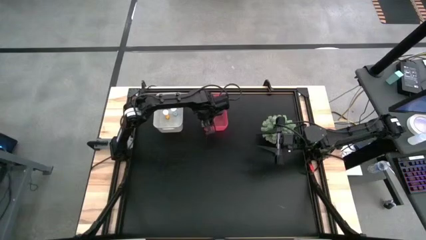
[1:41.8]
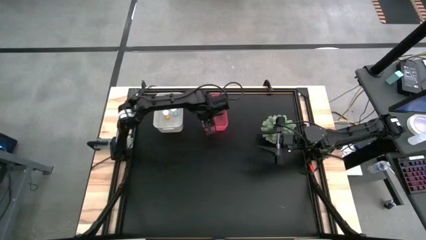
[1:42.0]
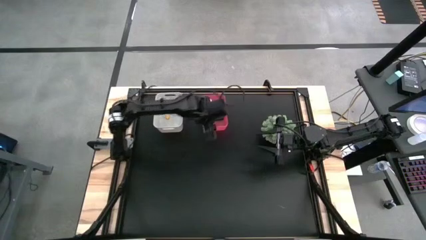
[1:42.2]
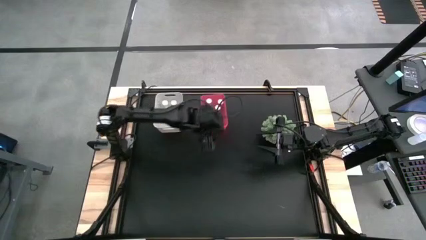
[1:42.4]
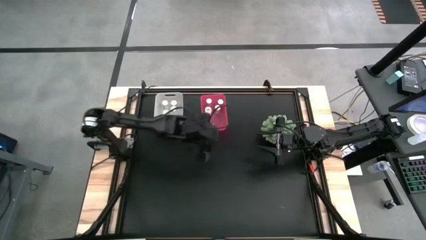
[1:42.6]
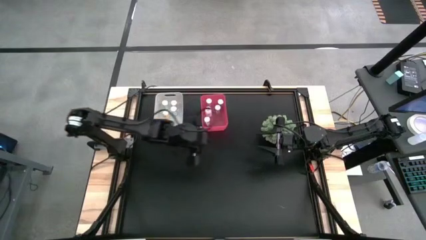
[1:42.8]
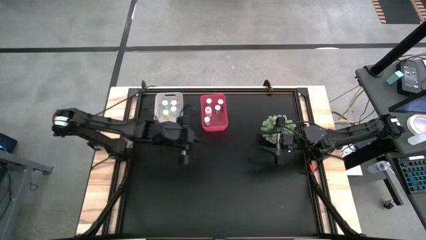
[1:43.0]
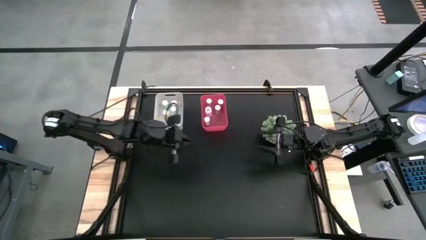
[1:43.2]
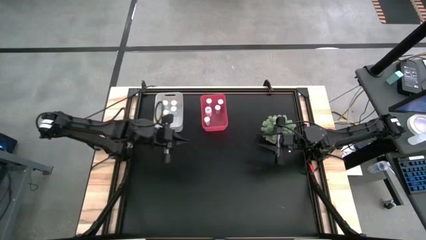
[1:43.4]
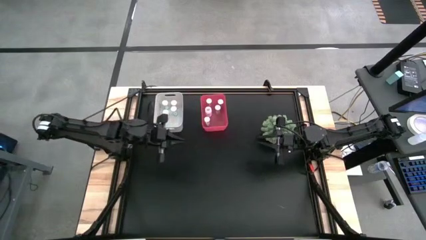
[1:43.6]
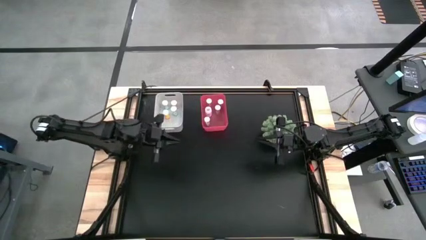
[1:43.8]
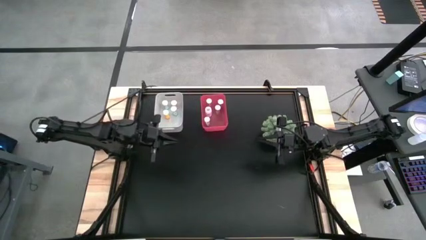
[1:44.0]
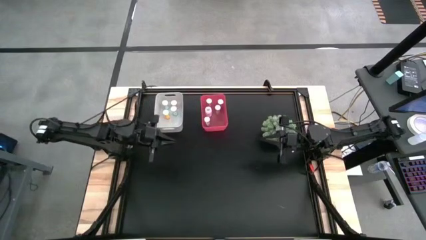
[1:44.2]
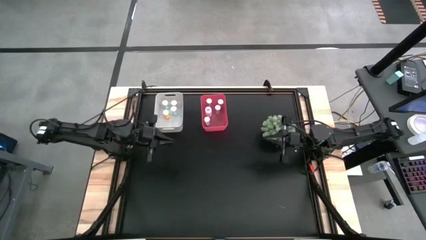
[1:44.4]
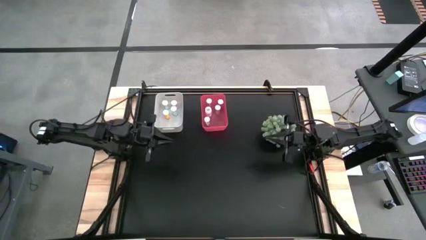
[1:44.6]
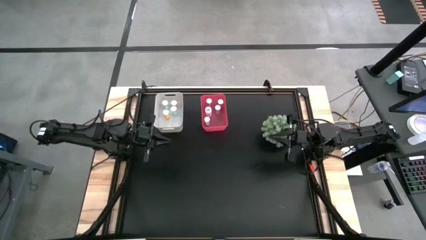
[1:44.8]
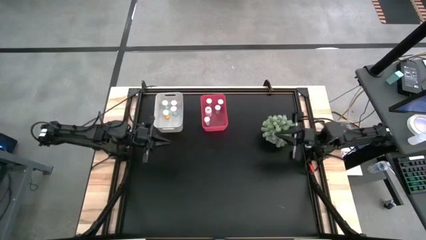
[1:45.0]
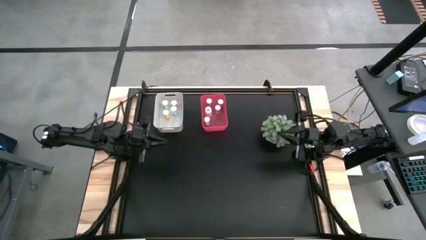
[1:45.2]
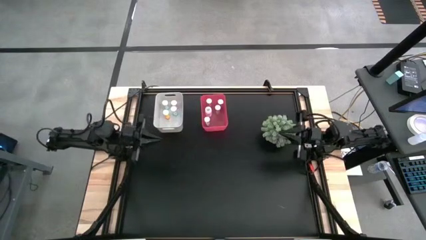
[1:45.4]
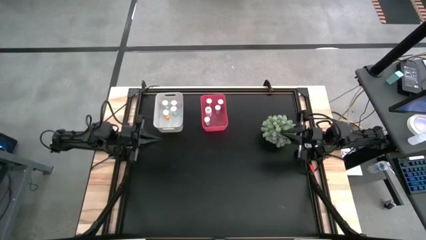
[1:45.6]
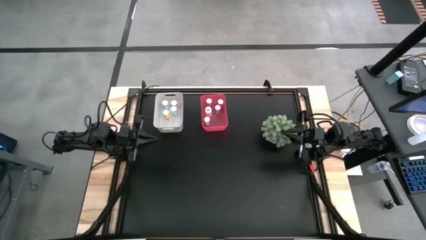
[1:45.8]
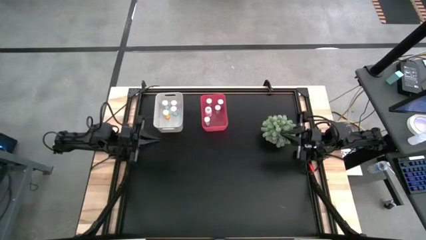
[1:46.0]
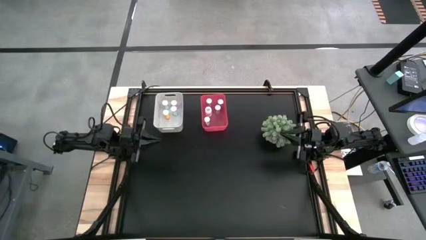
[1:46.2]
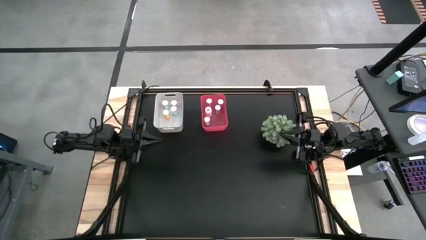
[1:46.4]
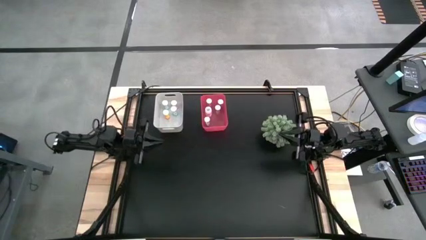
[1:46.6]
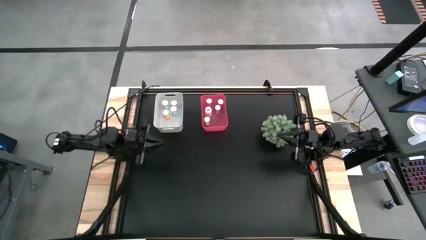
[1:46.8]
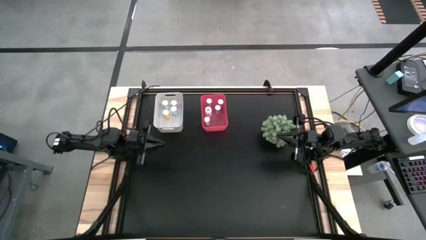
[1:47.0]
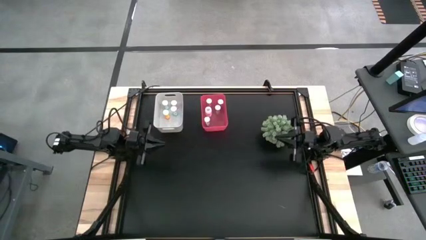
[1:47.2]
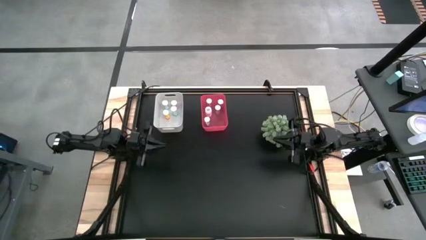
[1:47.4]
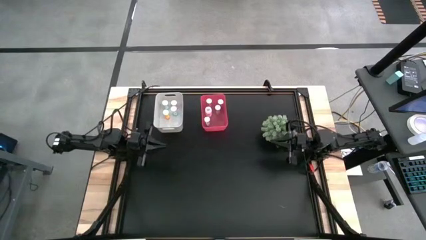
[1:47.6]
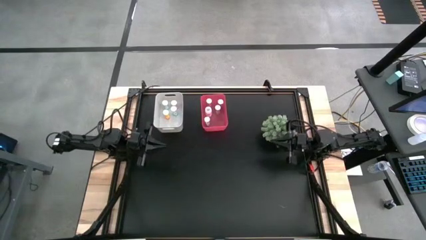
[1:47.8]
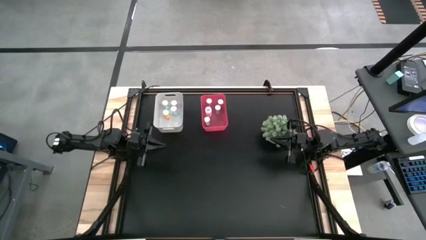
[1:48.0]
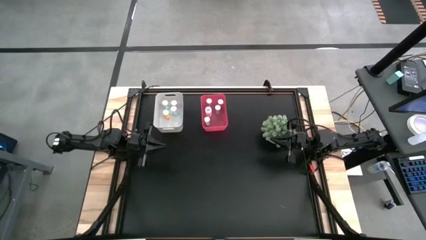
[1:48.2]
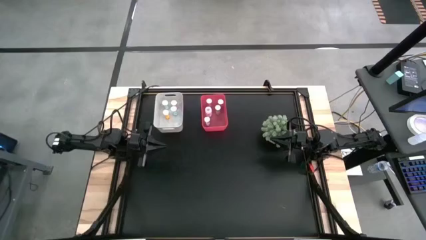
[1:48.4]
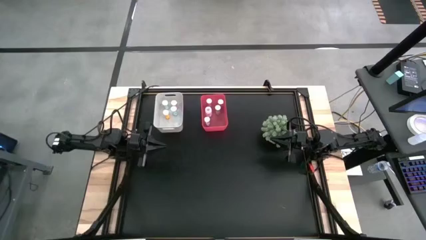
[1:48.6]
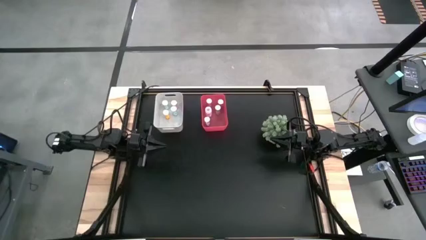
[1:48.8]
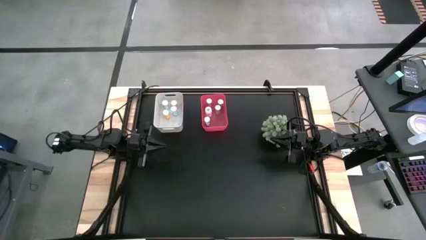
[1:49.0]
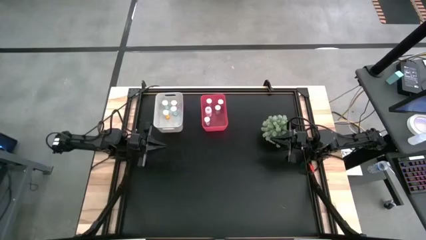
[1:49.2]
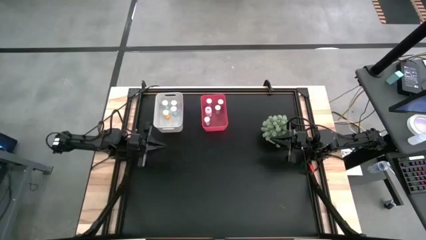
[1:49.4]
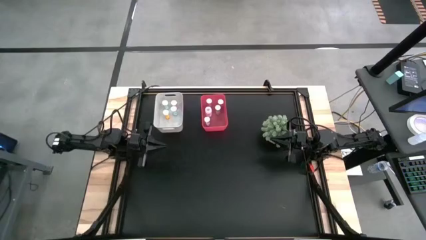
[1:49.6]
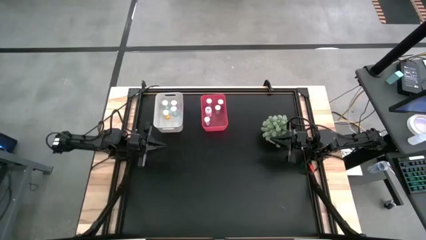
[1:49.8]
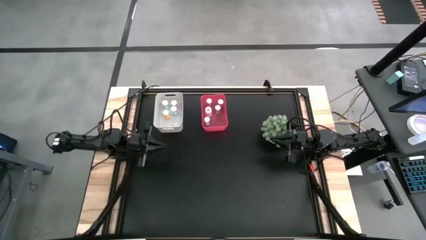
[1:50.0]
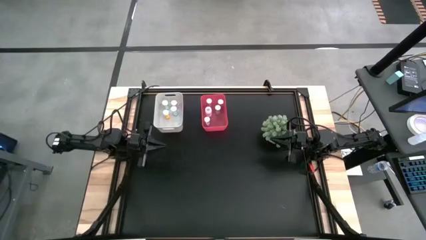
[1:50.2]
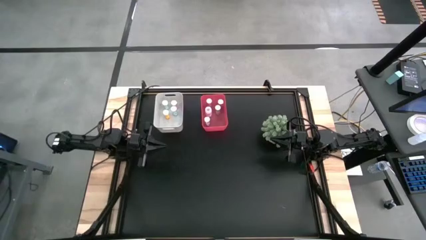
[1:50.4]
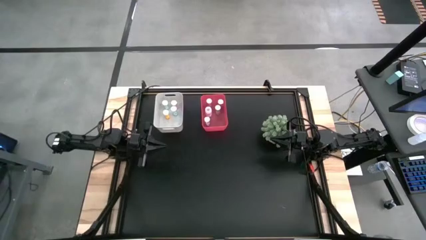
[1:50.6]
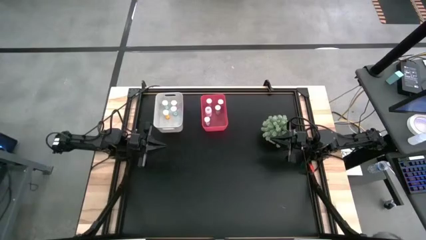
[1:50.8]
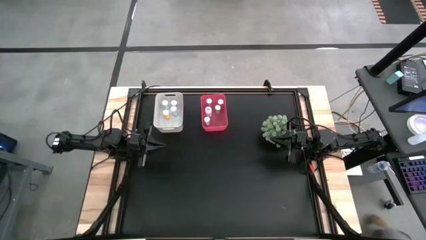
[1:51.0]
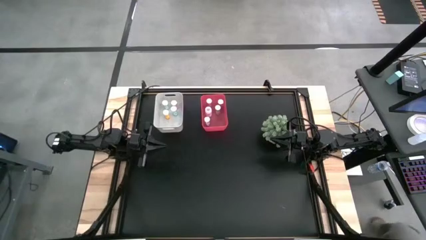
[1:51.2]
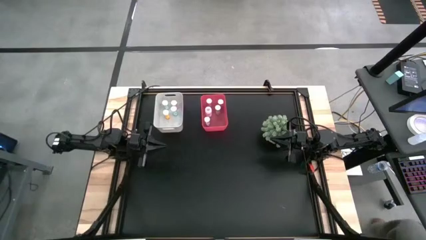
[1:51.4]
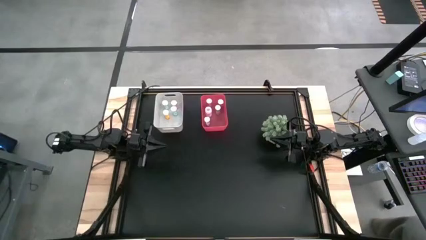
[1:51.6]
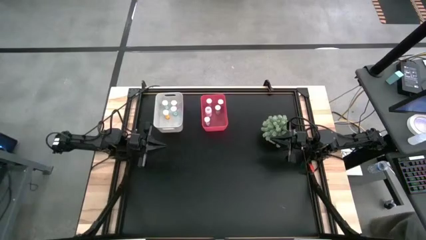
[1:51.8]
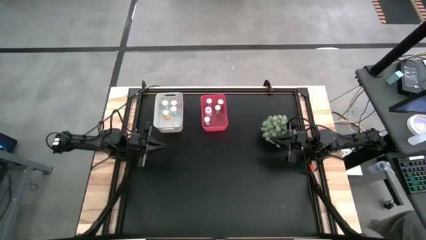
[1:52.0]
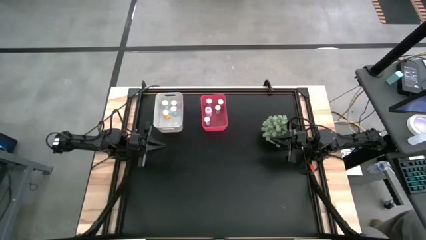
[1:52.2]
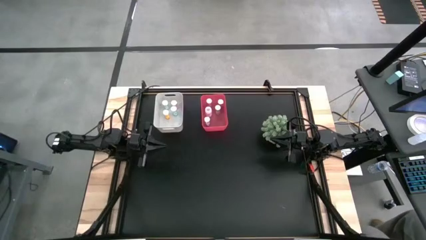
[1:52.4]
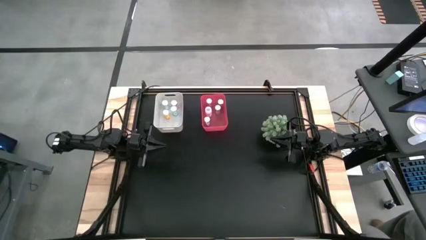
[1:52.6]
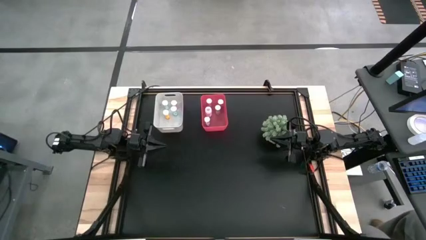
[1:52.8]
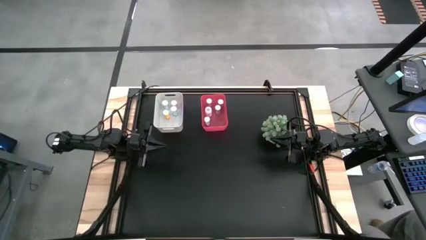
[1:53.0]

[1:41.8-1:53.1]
Task: Pick and place medicine bottles into bin by pill shape (circle, oval)
Return to Home Position
